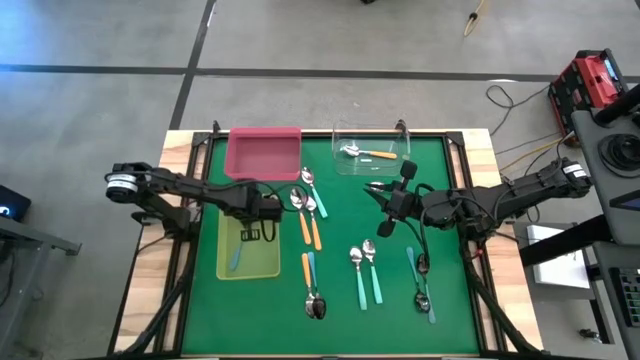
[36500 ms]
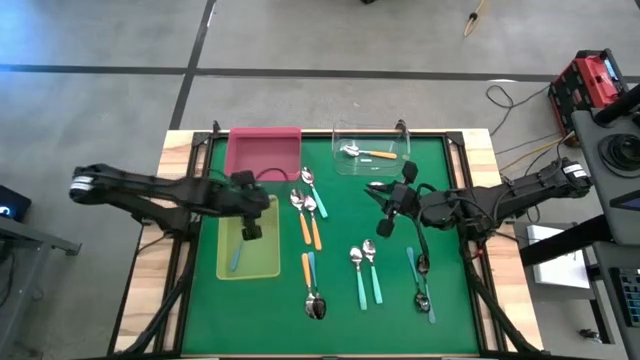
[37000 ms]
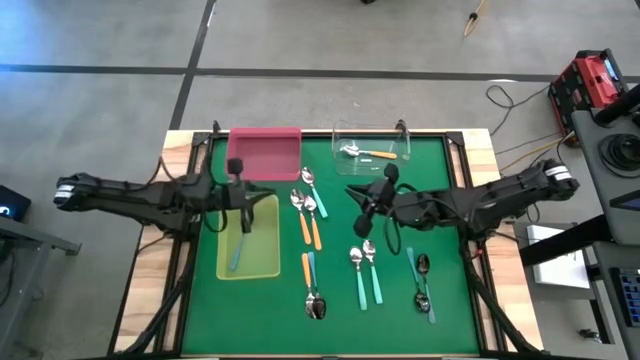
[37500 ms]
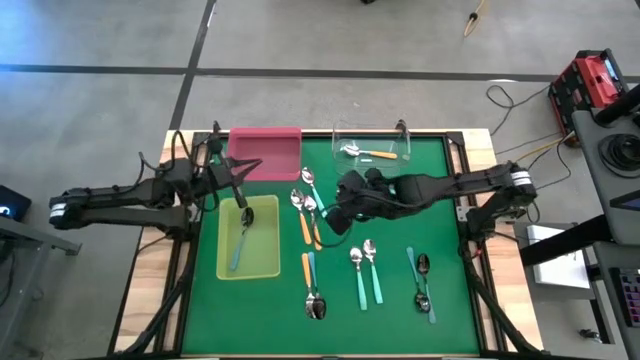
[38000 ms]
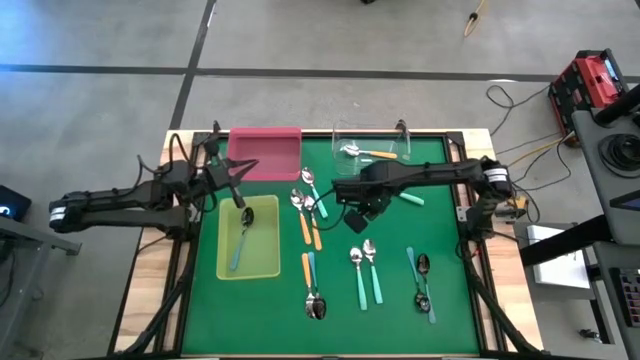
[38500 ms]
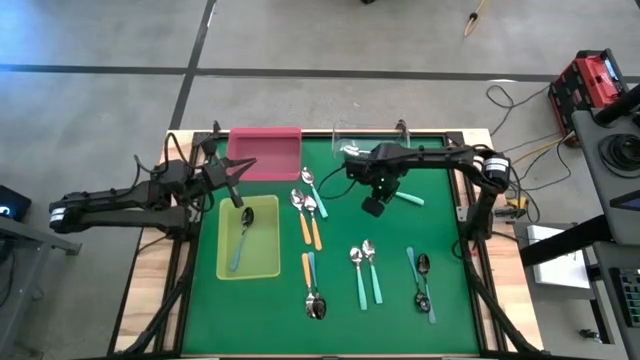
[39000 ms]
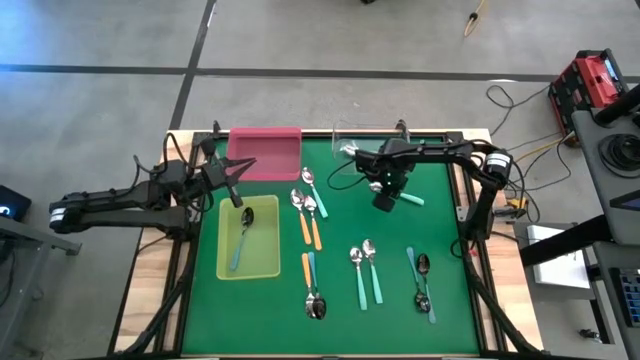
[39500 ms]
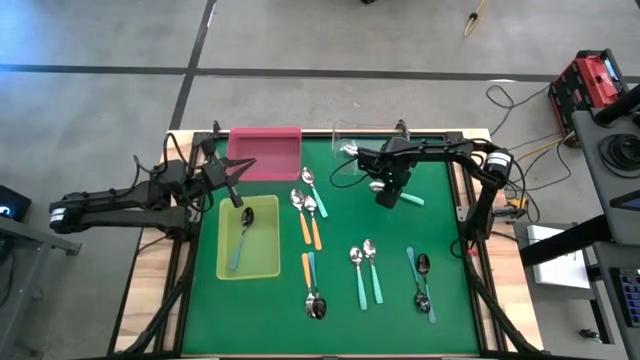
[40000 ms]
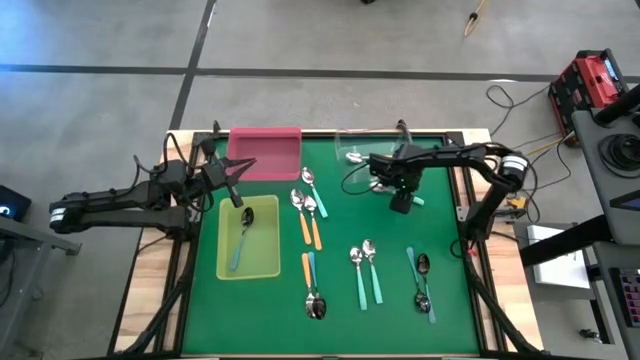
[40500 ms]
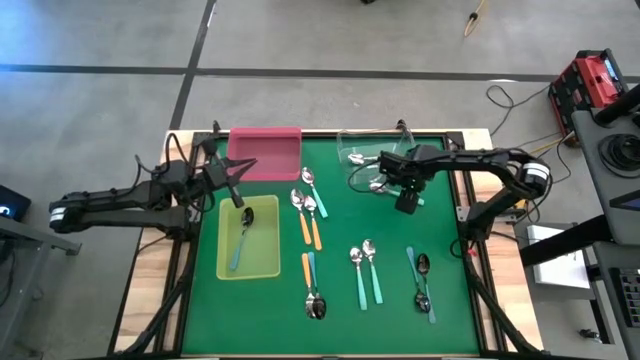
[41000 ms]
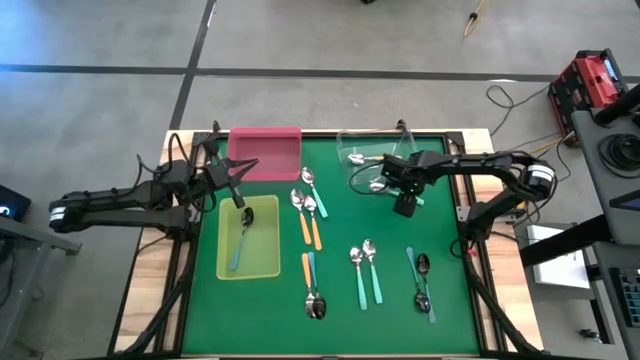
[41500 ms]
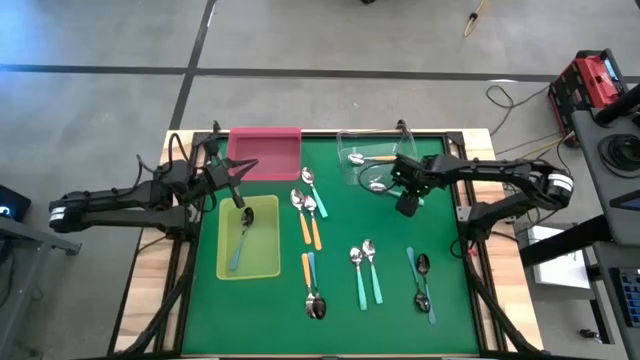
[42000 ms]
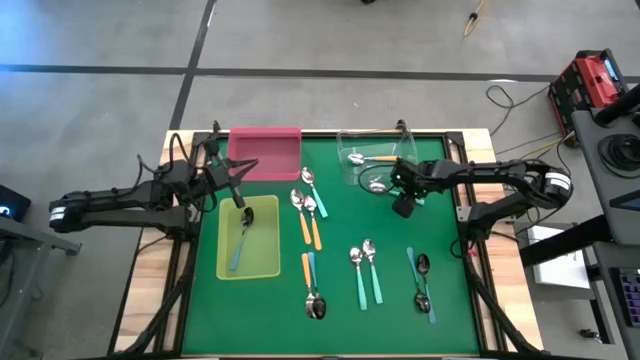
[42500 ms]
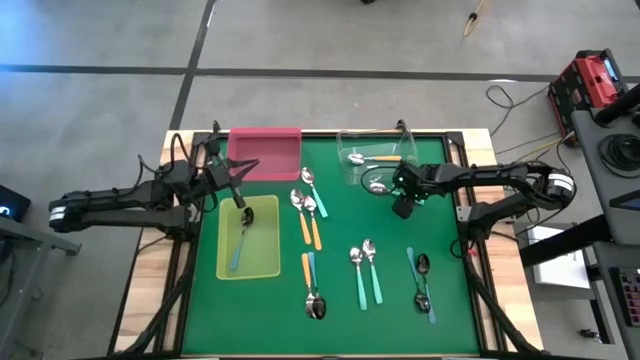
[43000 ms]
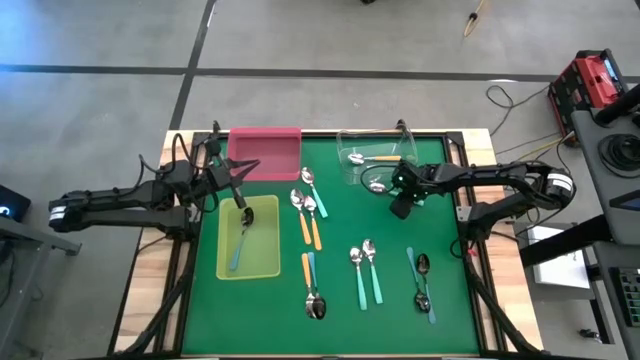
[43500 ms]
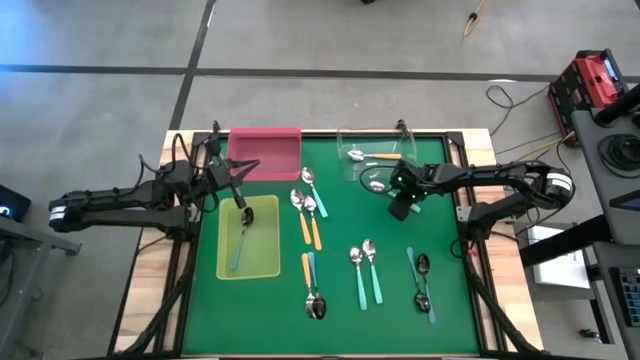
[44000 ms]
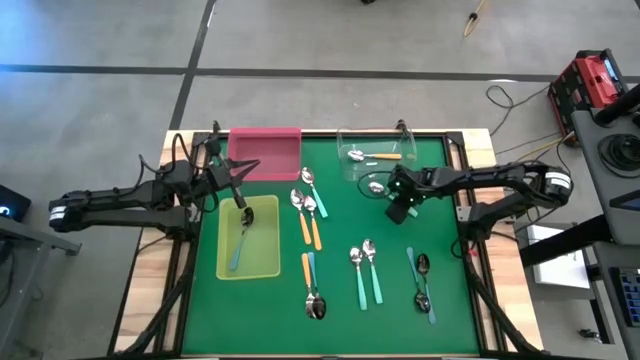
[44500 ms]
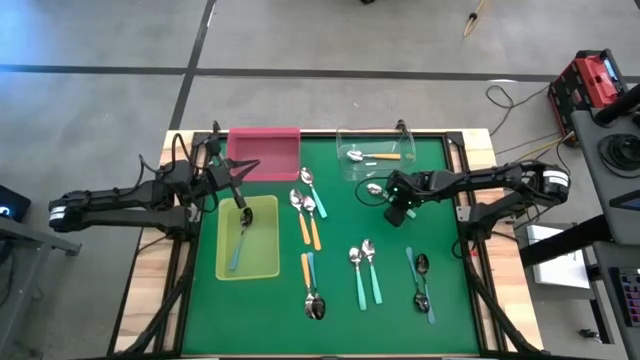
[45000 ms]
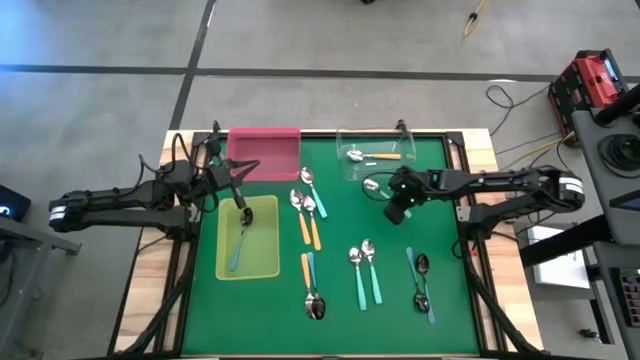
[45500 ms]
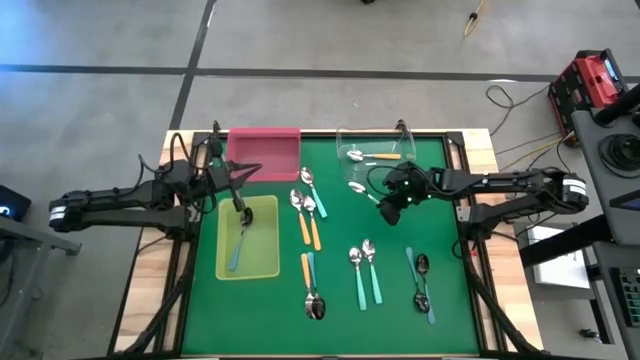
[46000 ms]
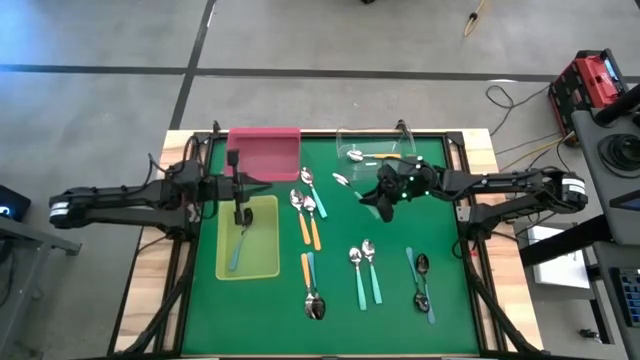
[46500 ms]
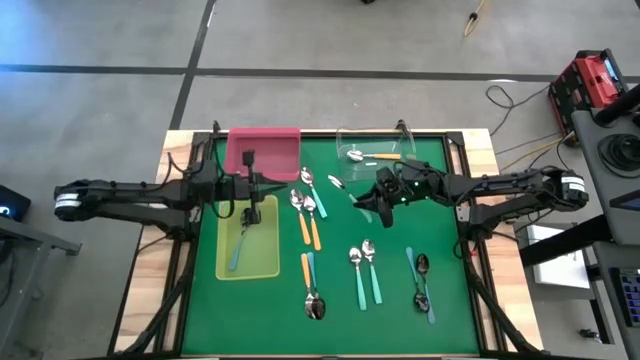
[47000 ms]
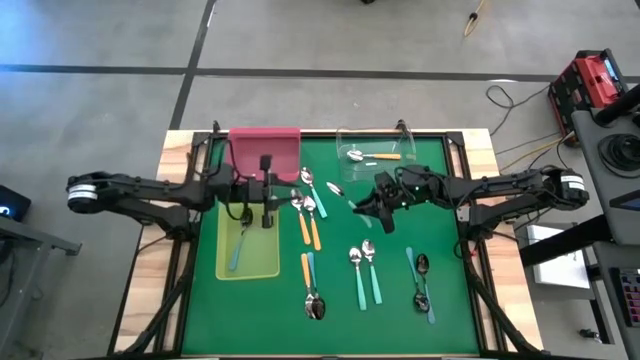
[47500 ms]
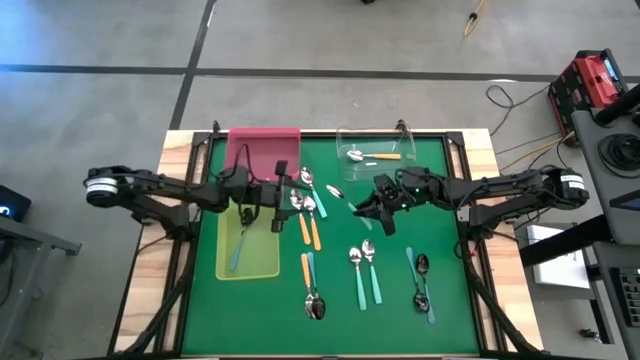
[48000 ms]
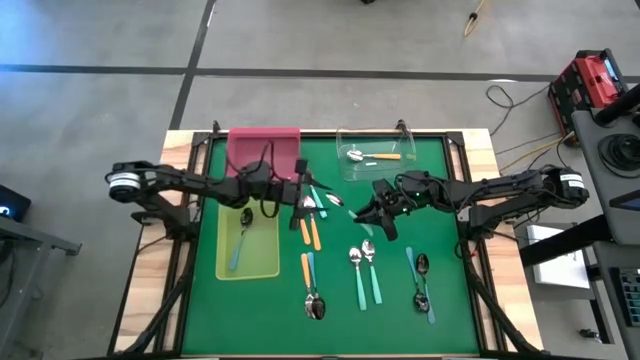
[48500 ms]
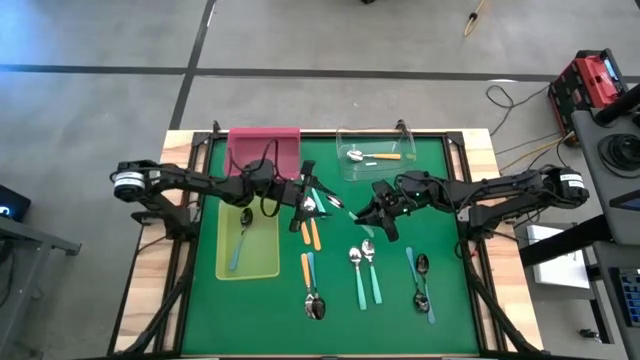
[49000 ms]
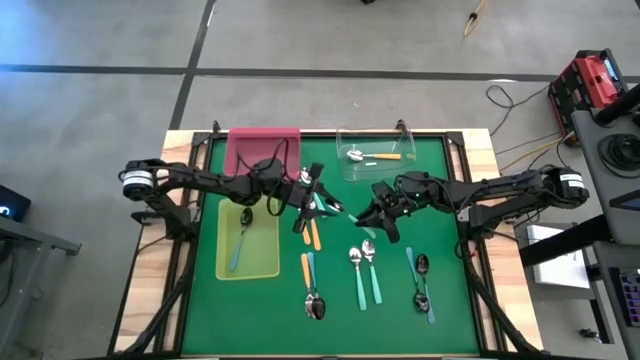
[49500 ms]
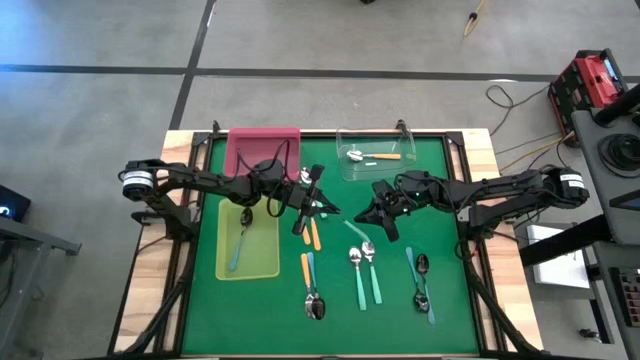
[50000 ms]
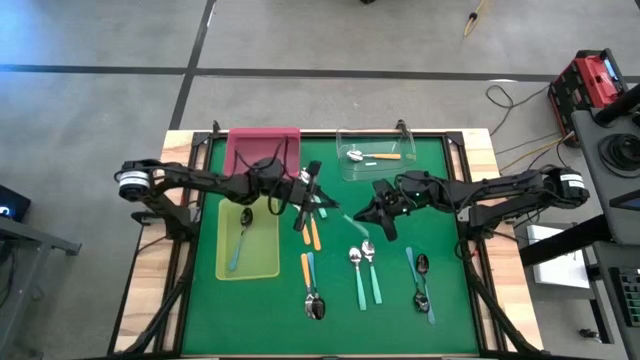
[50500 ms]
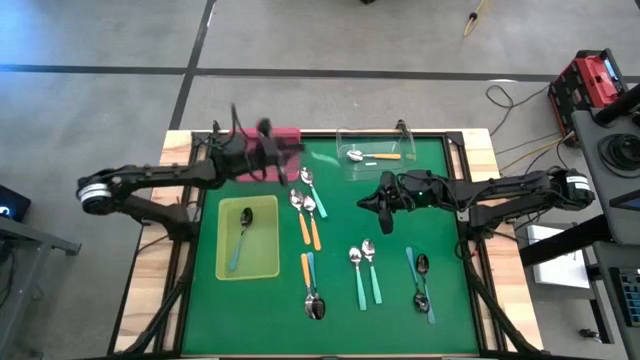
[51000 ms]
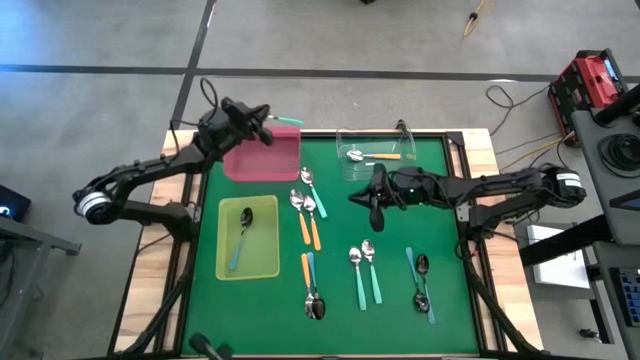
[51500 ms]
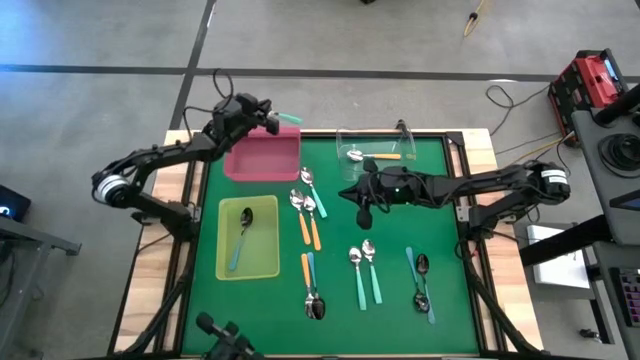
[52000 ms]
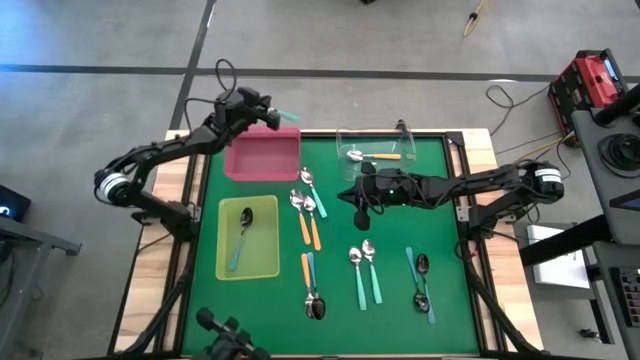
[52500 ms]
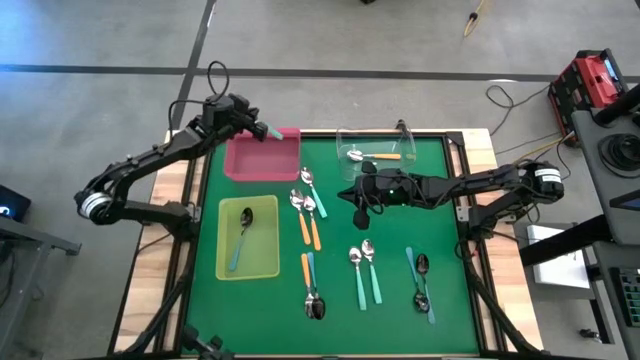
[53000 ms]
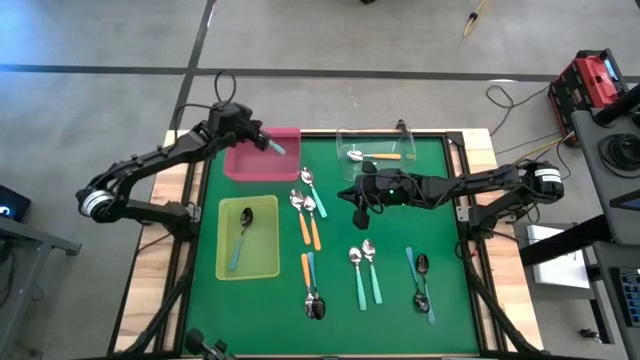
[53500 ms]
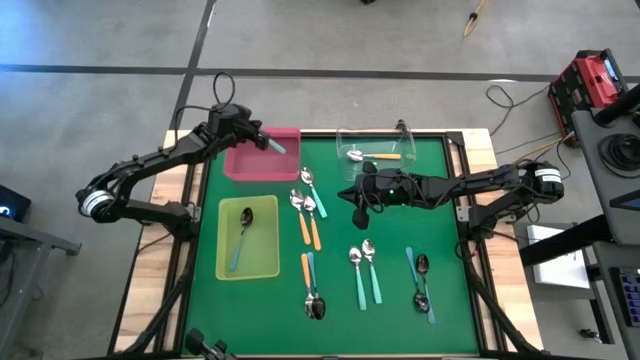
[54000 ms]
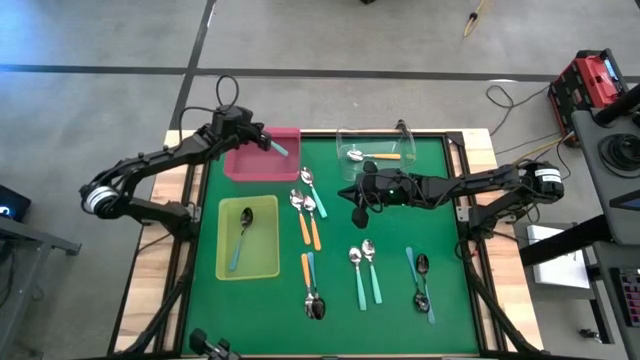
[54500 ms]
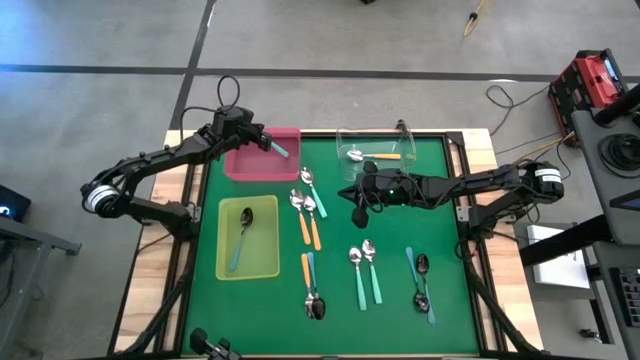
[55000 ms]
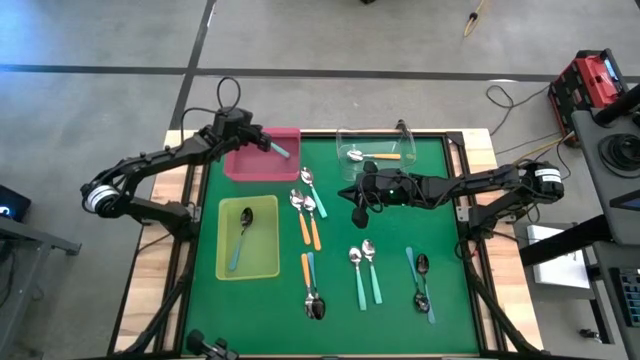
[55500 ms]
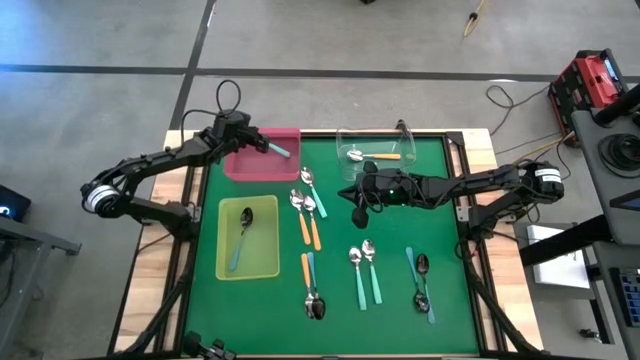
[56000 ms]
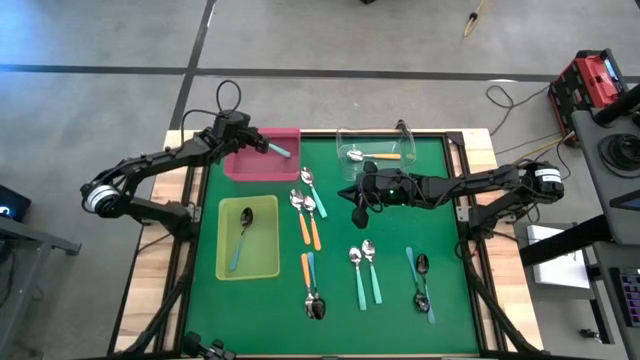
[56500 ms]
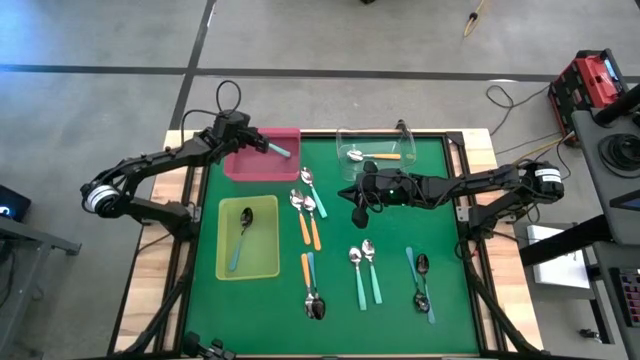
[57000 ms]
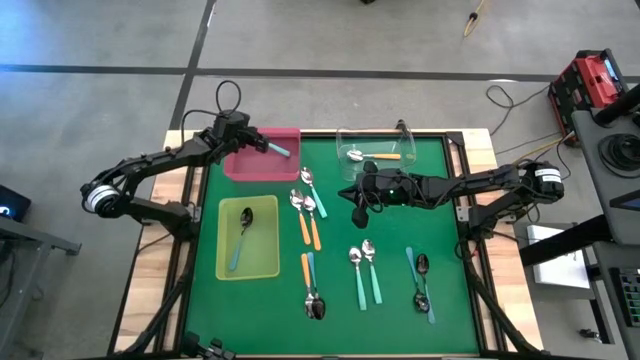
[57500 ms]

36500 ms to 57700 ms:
Task: Sort silverware by color (type)
Put the light blue spoon into the red bin
